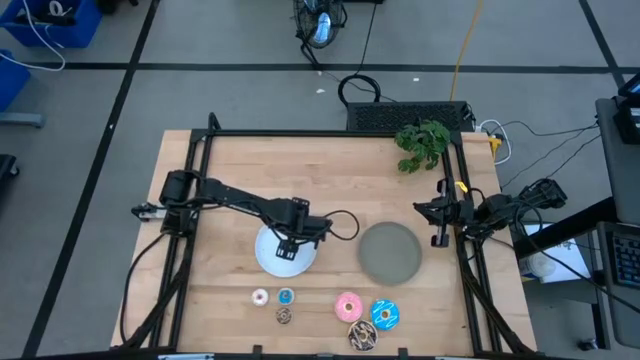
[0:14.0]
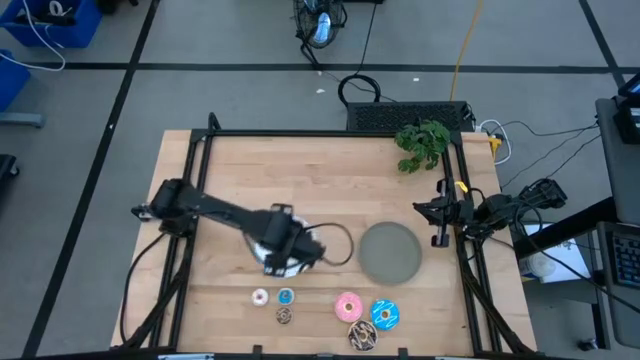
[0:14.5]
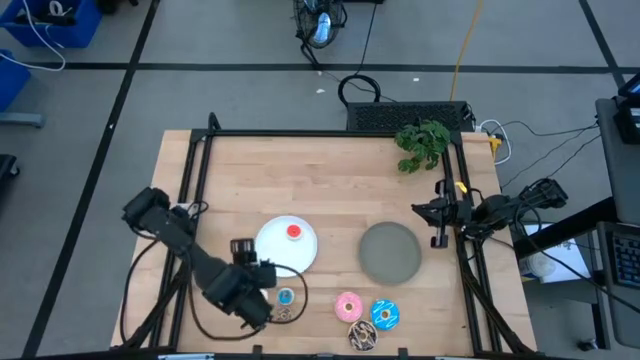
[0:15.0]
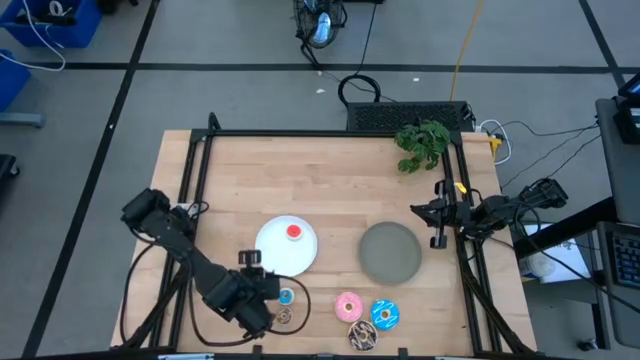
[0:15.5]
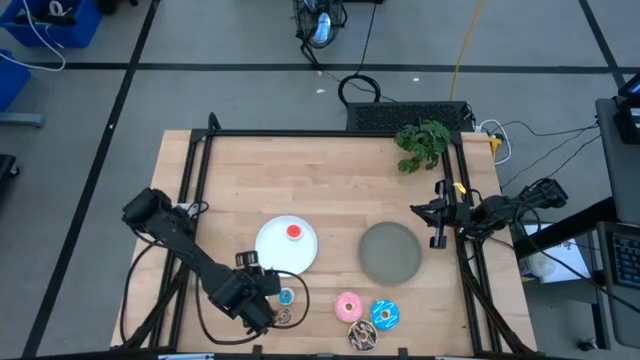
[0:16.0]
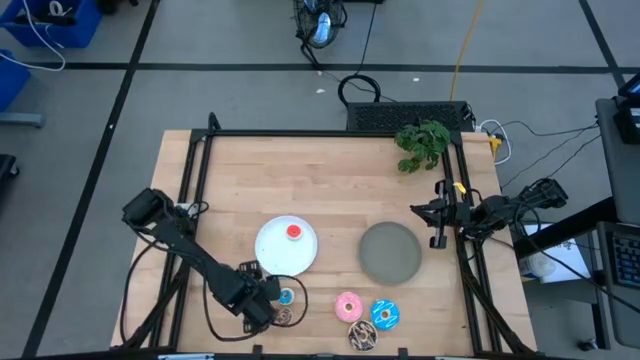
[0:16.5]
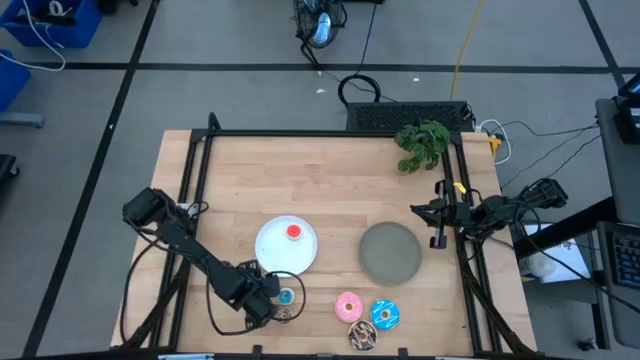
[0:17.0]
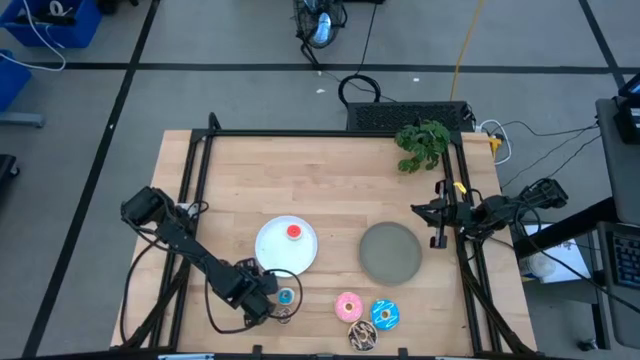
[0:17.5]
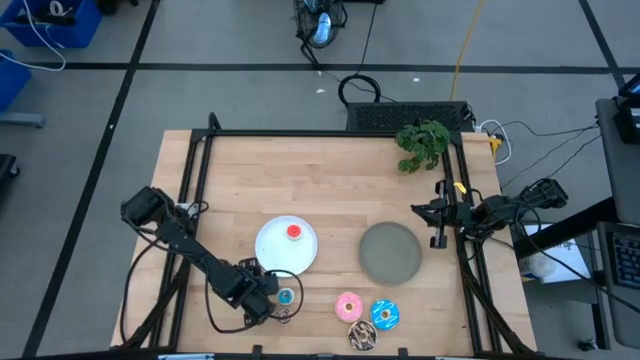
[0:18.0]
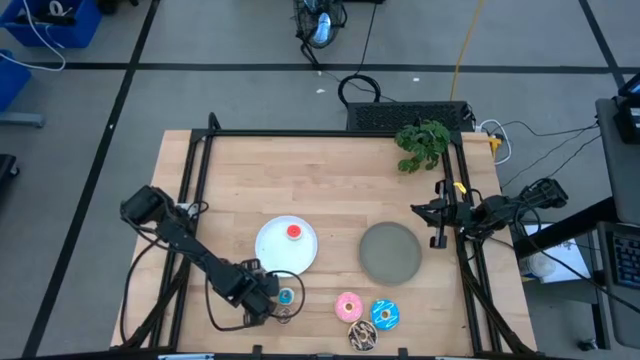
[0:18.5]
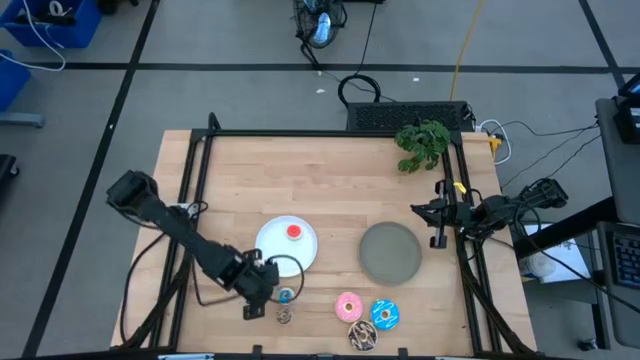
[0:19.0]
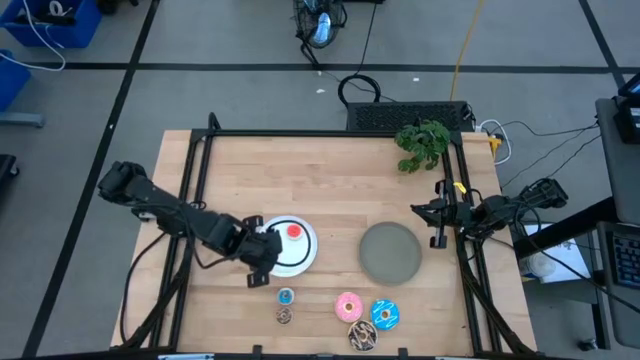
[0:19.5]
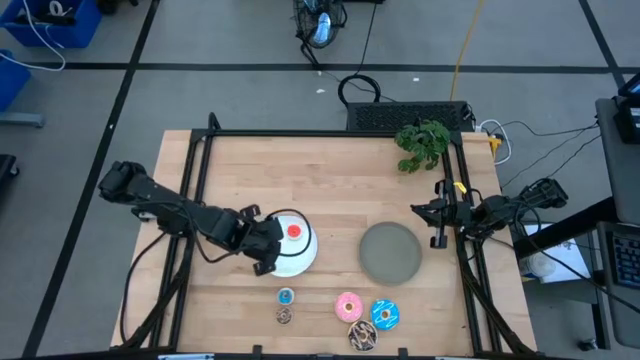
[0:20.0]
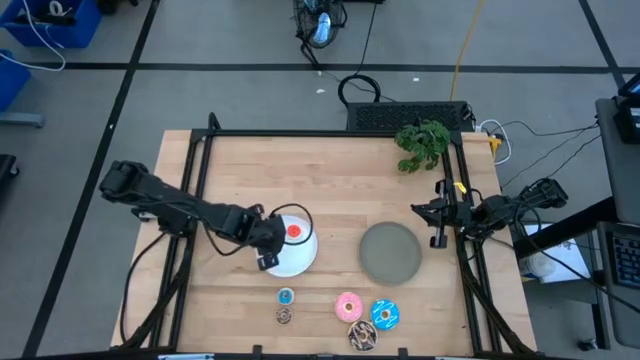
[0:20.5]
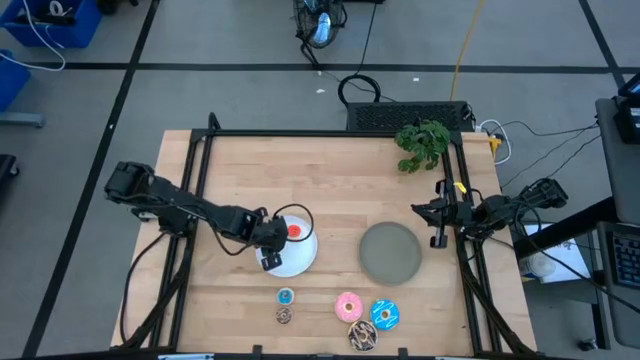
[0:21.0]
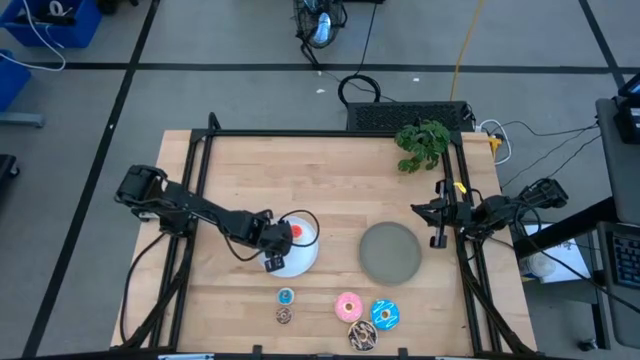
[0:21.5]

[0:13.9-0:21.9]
Task: Pick & Place donuts
Put the small white doughnut on the white plate

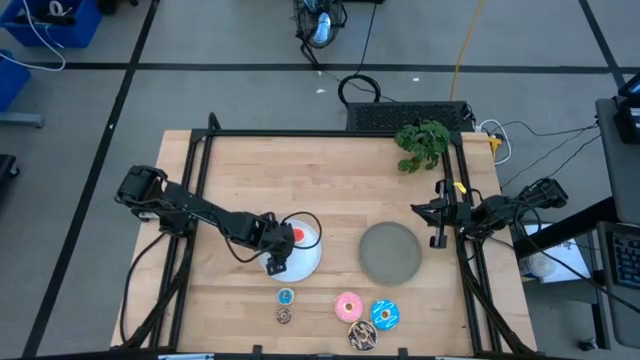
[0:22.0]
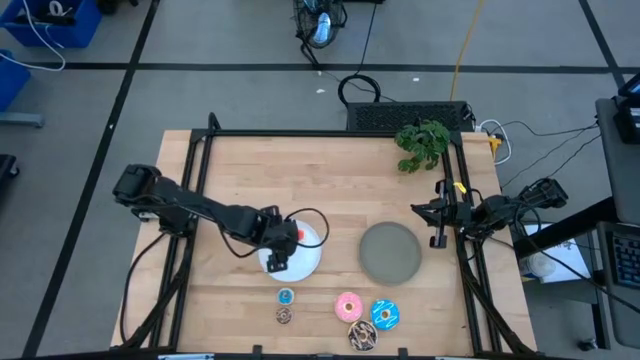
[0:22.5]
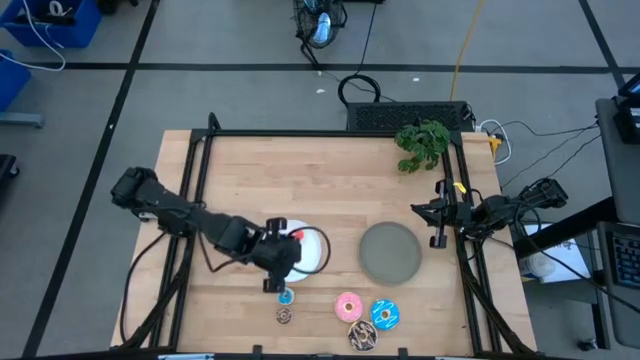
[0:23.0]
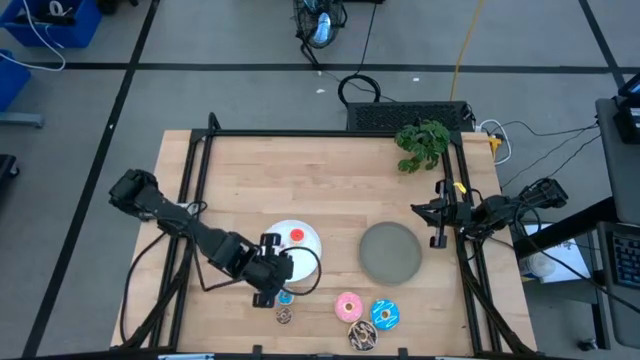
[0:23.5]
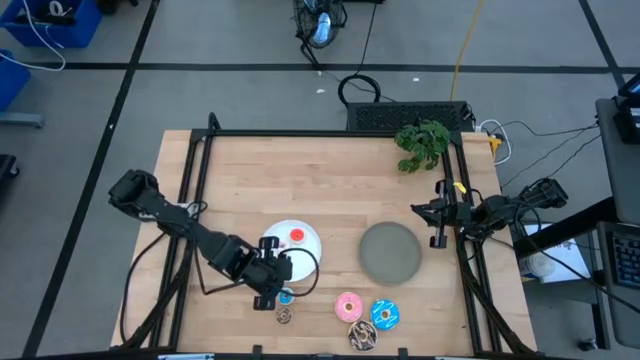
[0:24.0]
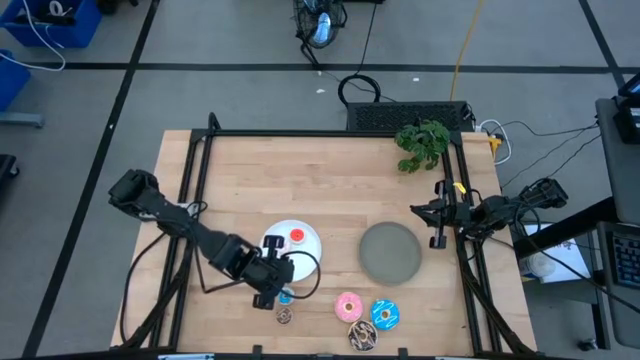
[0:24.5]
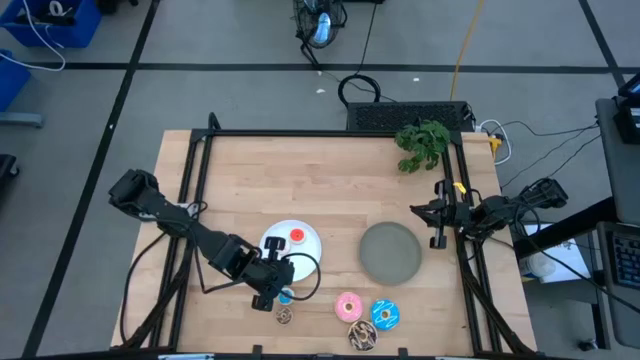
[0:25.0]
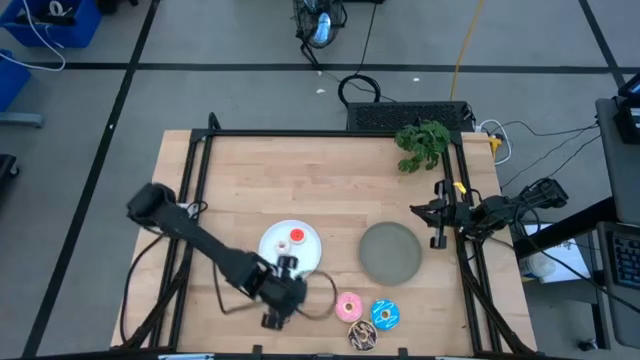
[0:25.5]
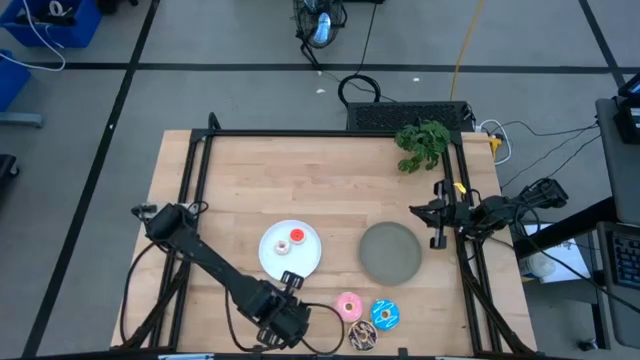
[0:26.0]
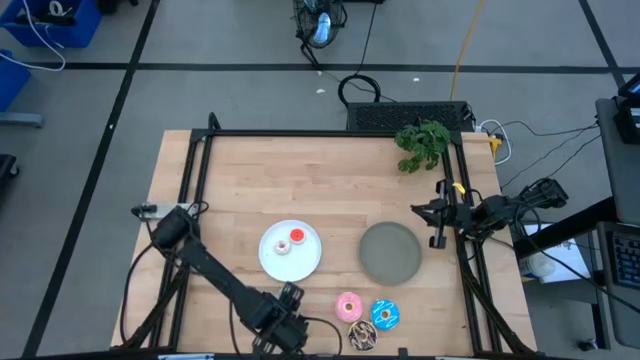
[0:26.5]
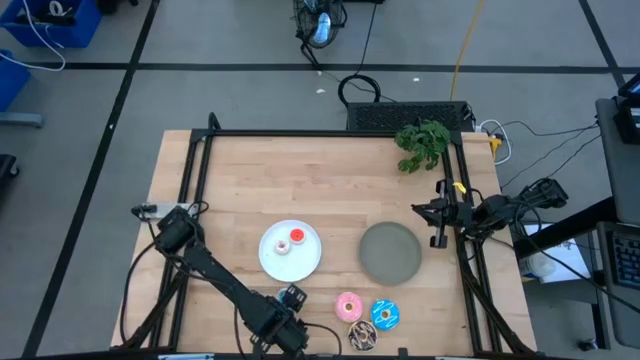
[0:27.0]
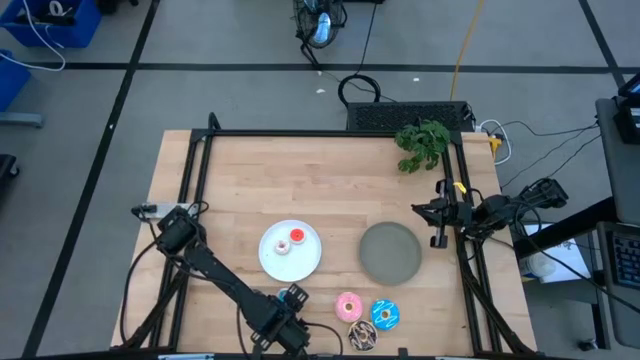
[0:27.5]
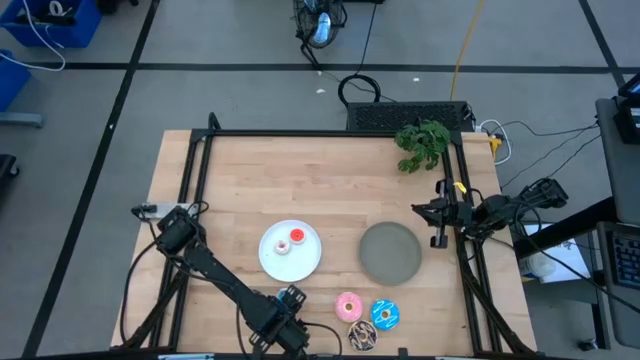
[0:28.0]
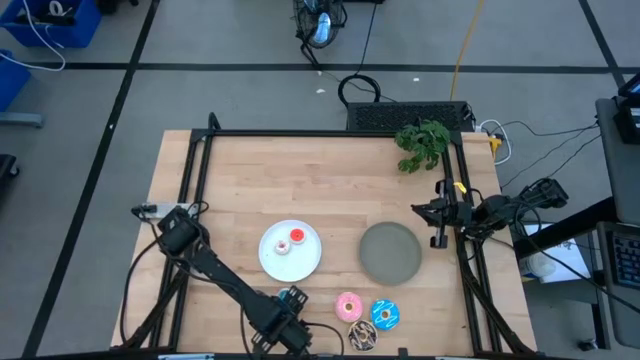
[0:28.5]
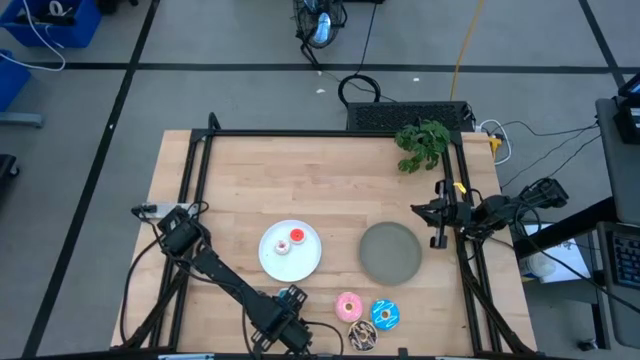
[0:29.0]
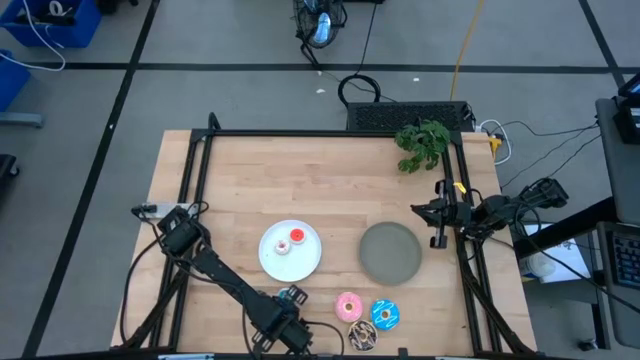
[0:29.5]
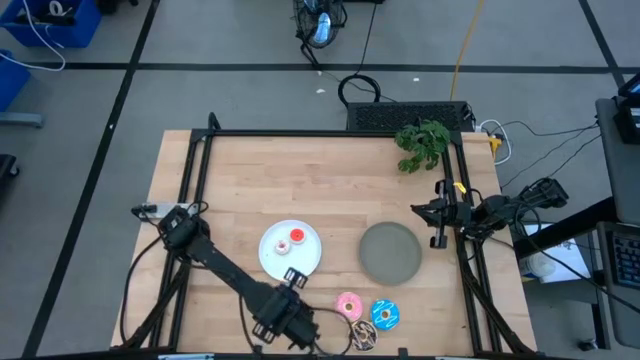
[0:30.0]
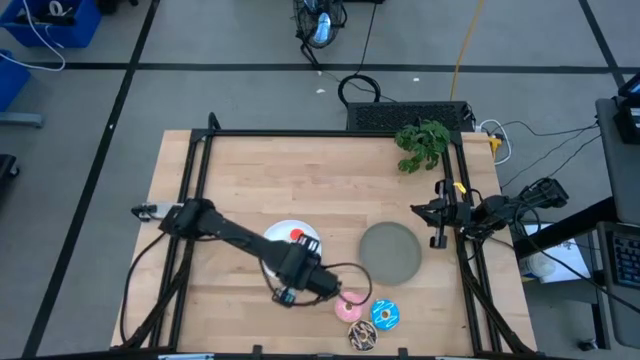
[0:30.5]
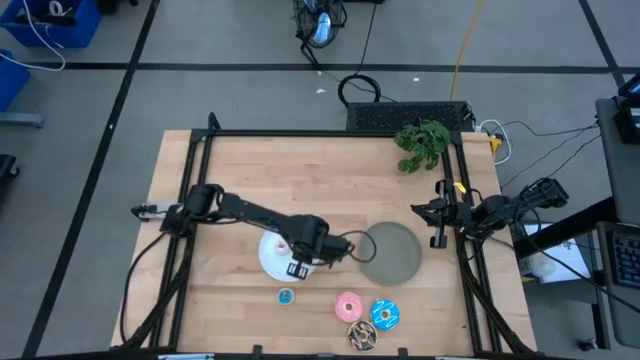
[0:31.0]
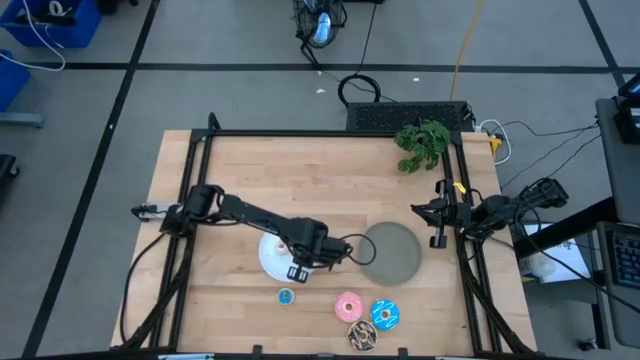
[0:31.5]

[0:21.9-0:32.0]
Put the small black doughnut on the white plate

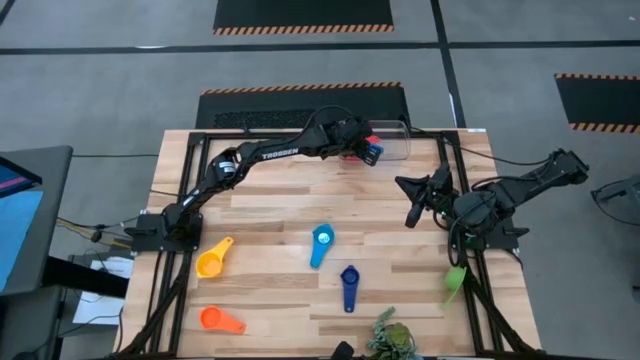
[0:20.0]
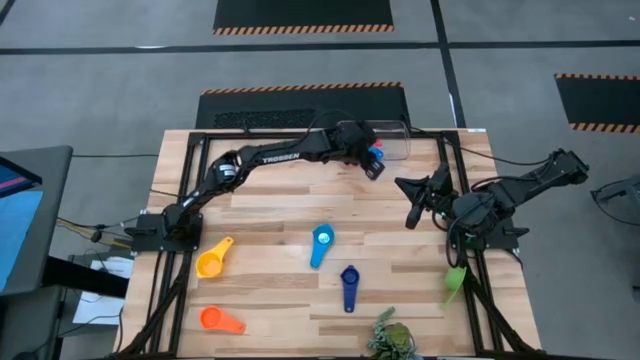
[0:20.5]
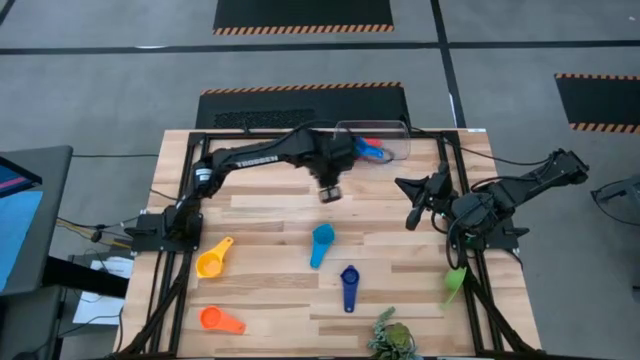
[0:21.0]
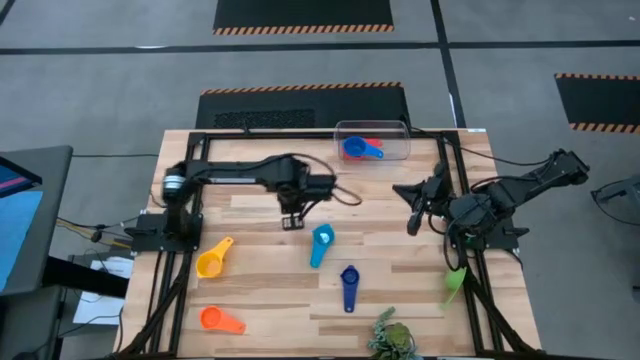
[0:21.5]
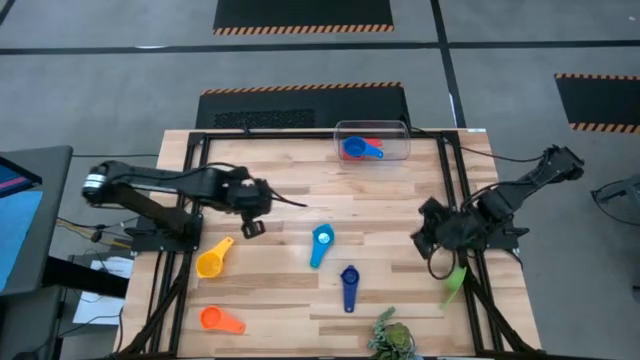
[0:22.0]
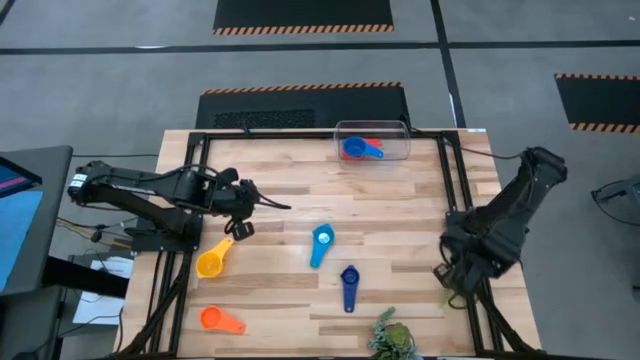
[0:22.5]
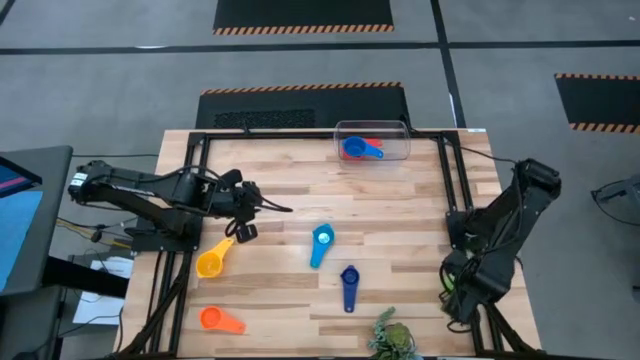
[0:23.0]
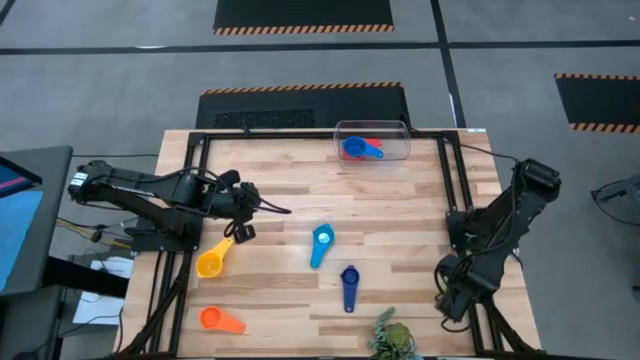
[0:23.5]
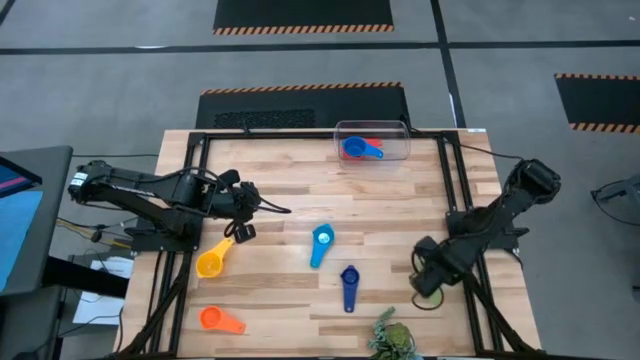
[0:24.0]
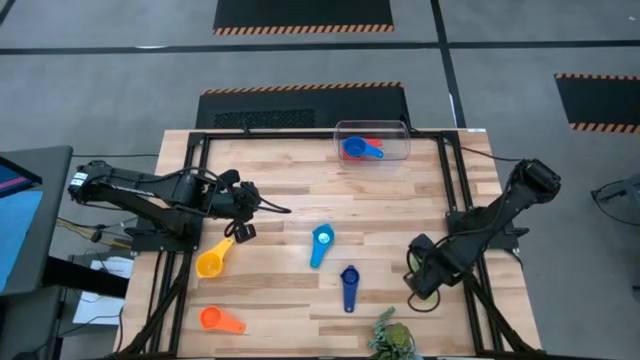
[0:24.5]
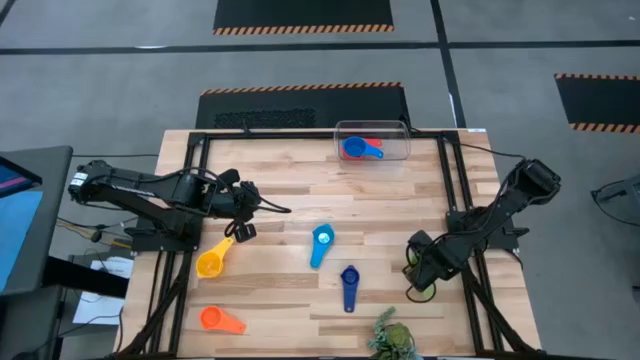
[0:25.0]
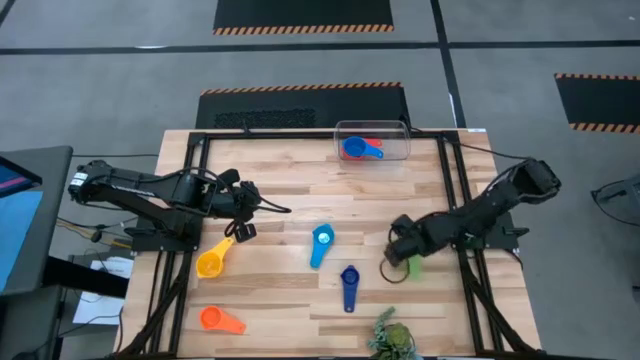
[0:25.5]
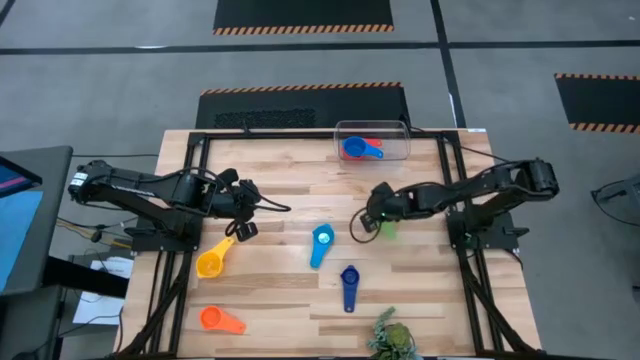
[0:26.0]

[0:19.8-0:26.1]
Task: Nest measuring cups in basket
Move the green measuring cups towards the center of the table
